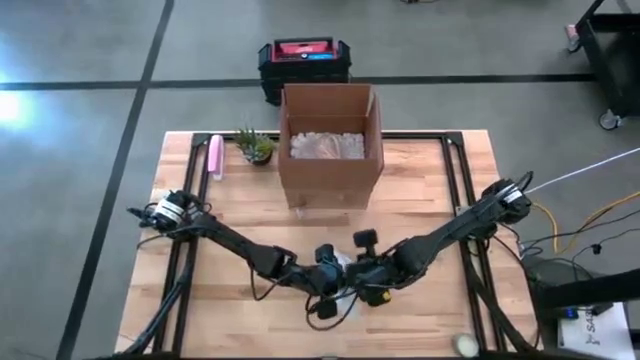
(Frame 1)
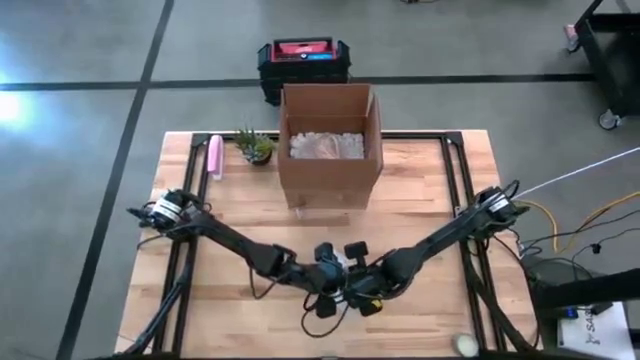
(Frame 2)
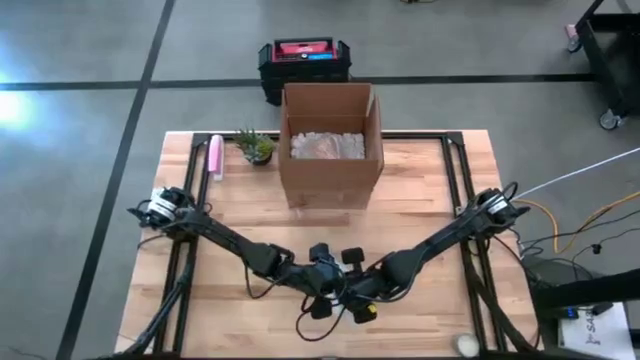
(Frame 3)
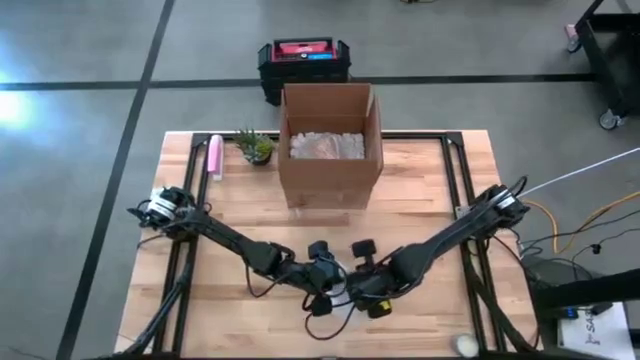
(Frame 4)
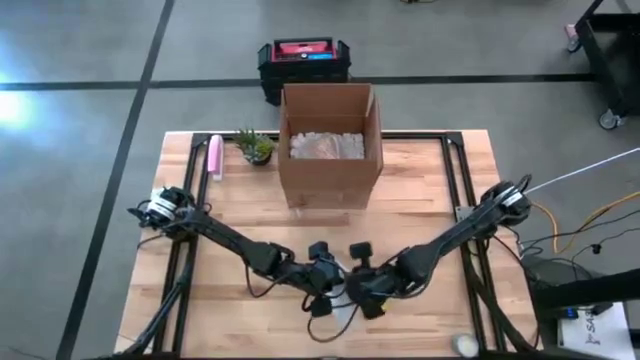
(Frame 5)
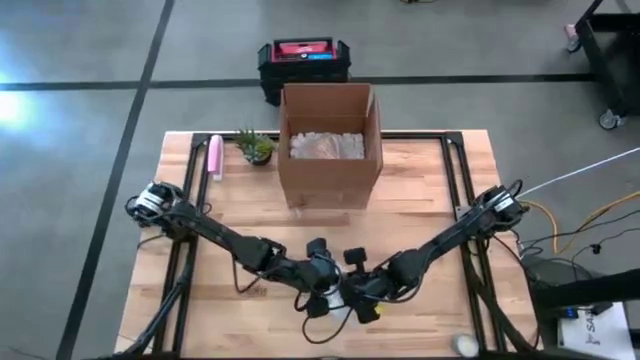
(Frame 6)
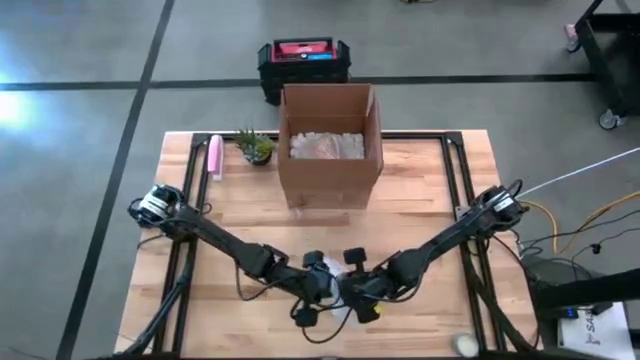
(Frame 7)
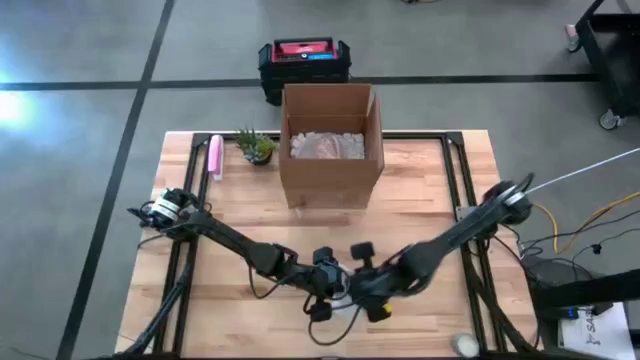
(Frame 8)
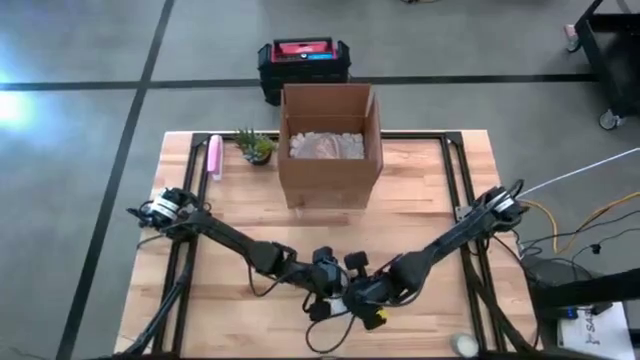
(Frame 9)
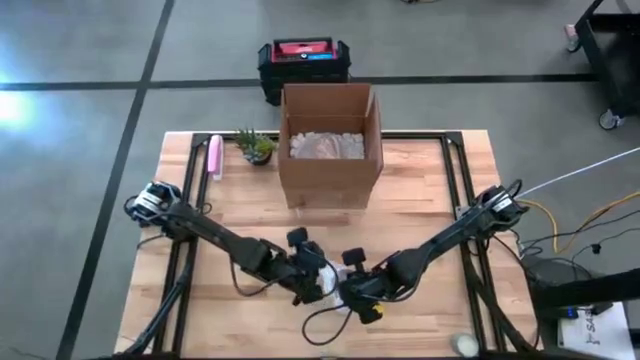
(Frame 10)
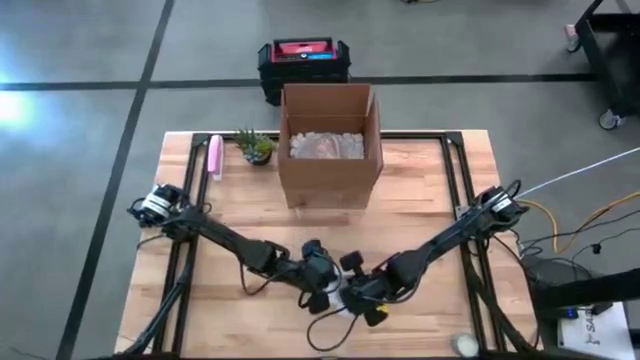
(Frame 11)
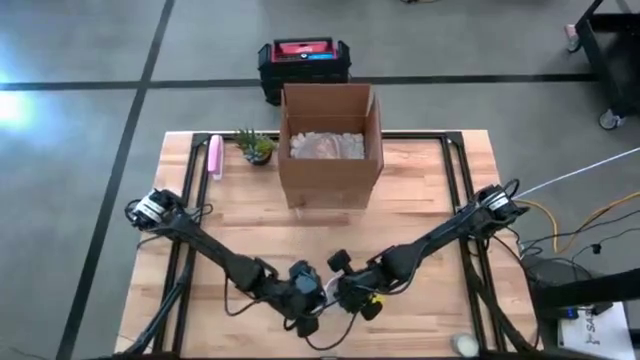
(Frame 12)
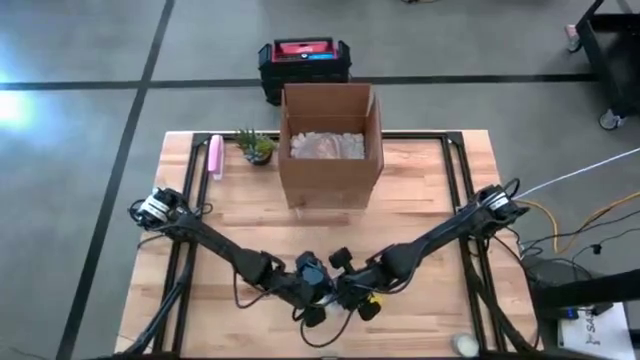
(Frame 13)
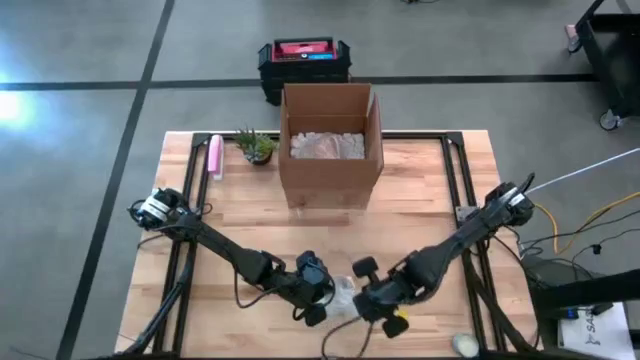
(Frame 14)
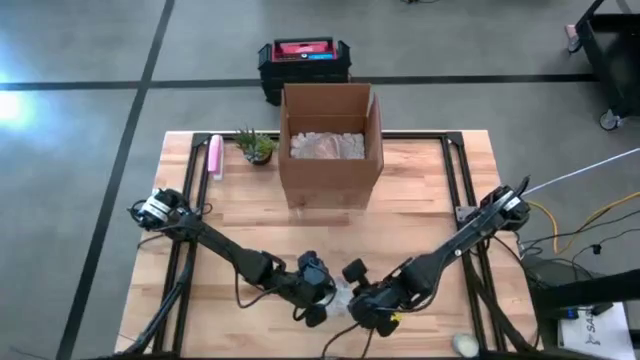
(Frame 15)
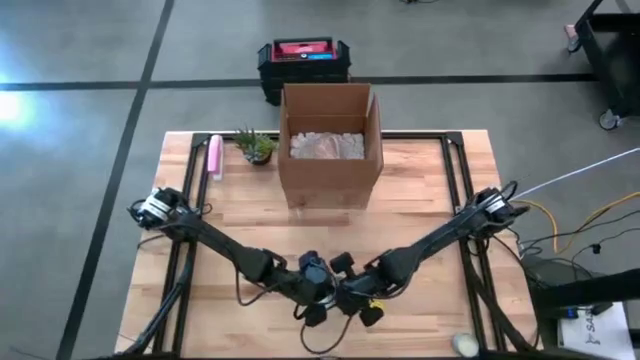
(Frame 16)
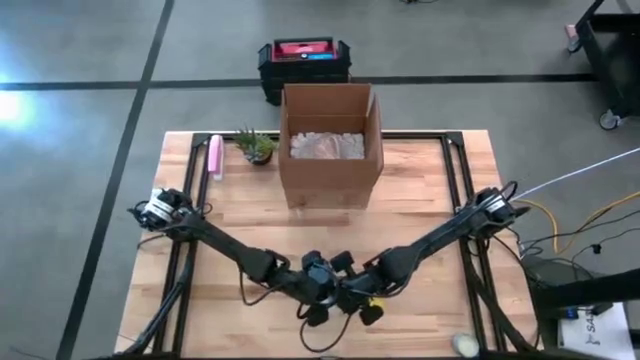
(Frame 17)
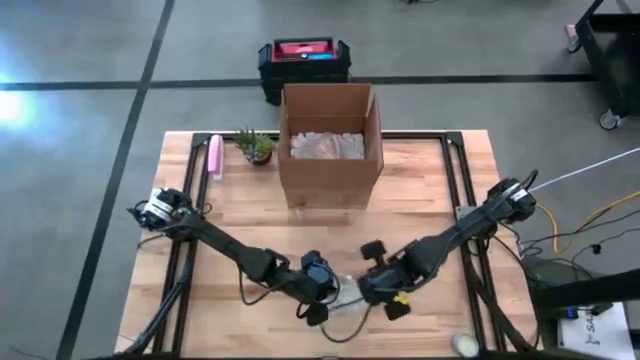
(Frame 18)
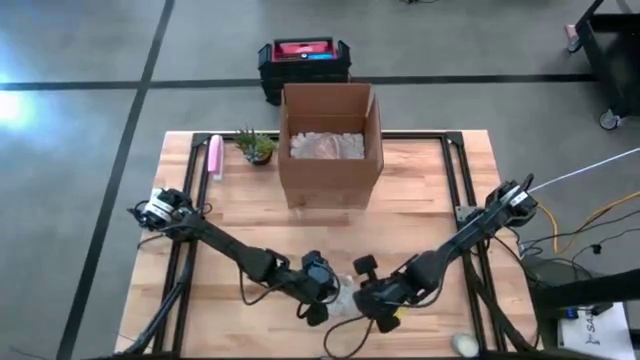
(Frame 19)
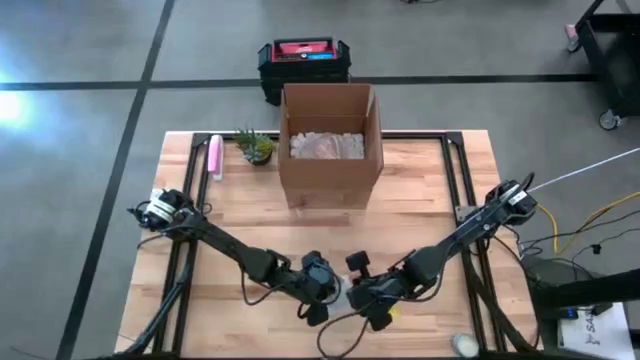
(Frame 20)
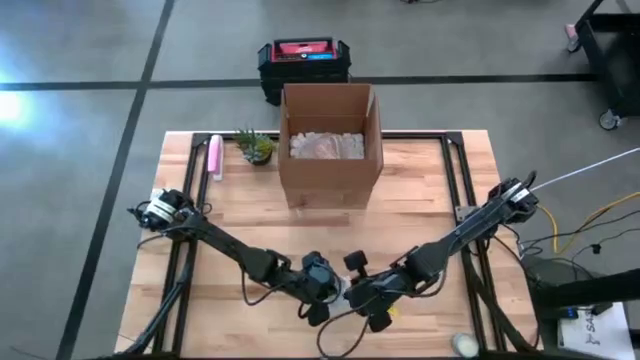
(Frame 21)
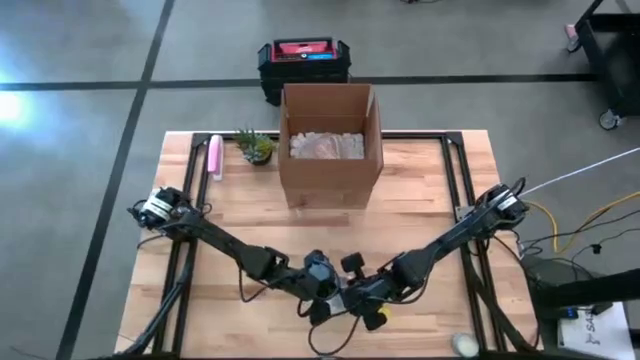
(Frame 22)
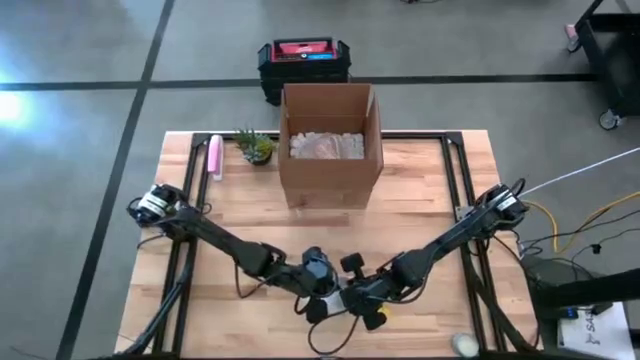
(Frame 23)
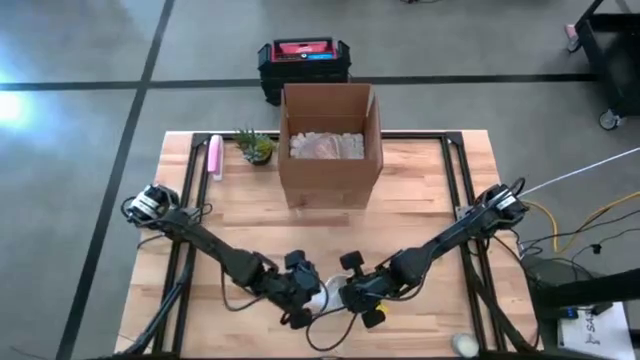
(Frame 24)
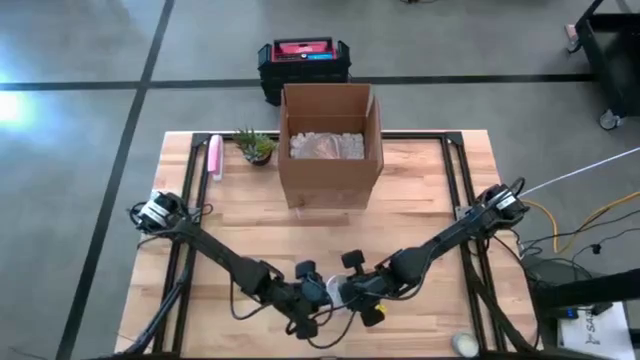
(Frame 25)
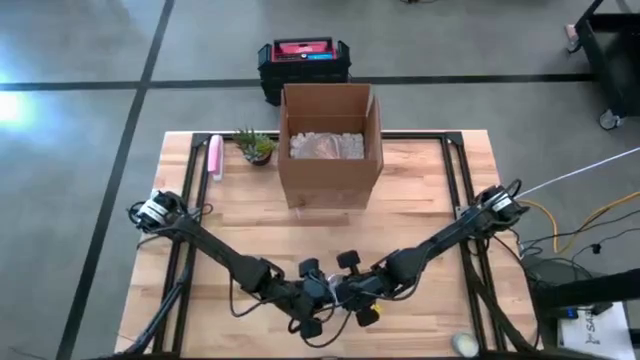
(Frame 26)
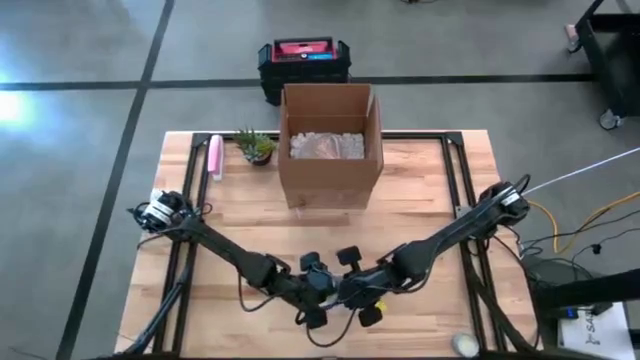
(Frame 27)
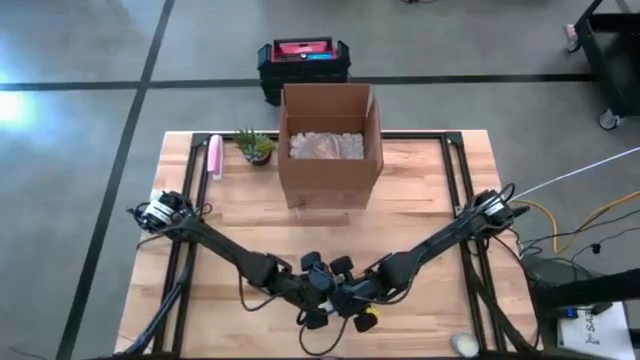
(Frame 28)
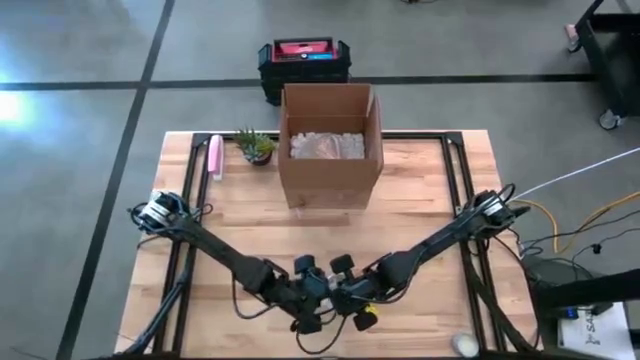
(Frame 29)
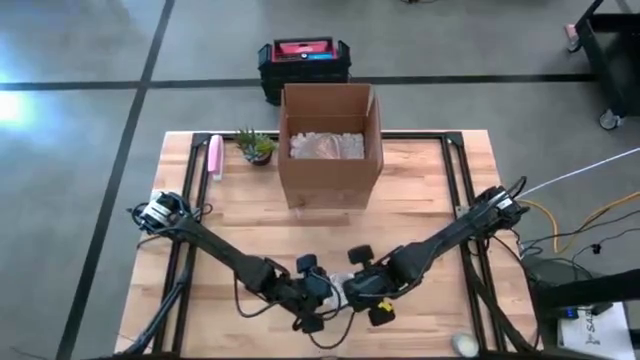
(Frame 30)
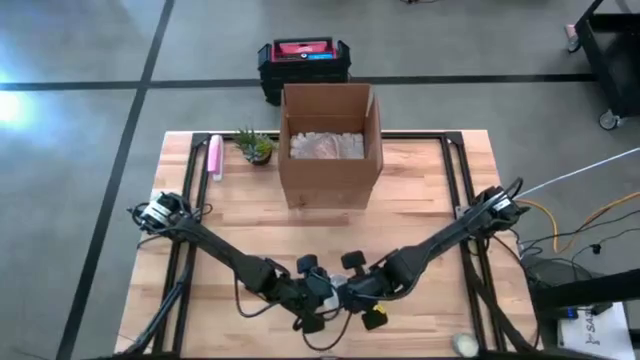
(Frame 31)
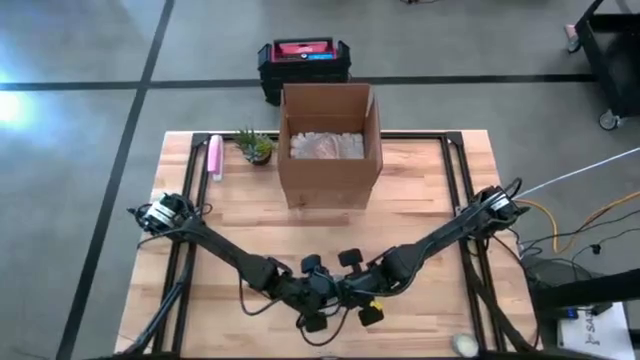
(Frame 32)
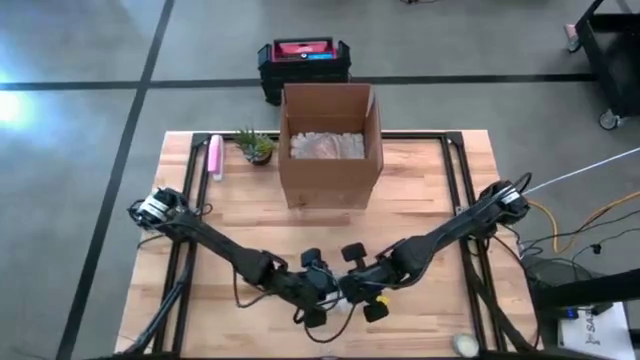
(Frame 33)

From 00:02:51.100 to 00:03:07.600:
Task: wrap mug
Wrap the gray mug with the bubble wrap

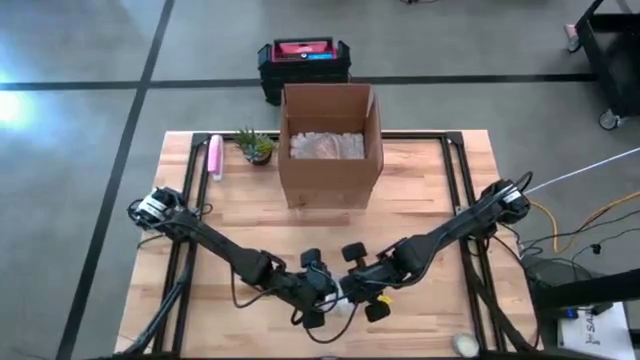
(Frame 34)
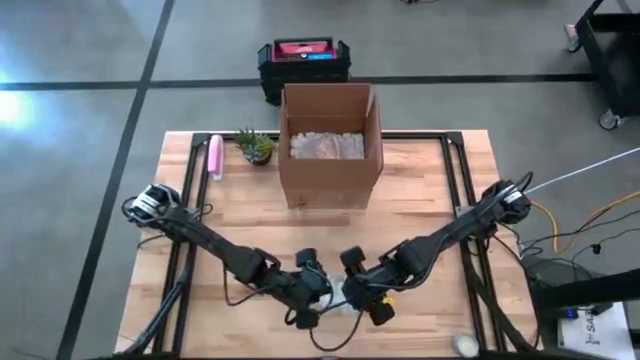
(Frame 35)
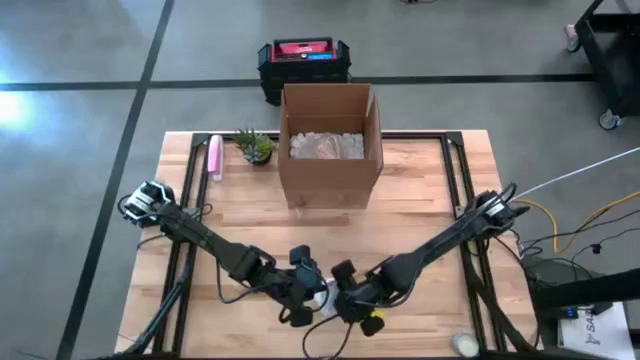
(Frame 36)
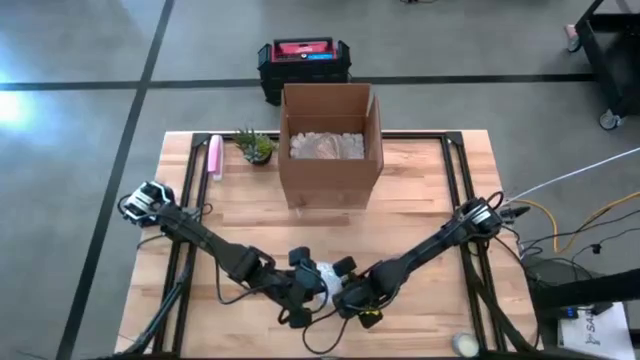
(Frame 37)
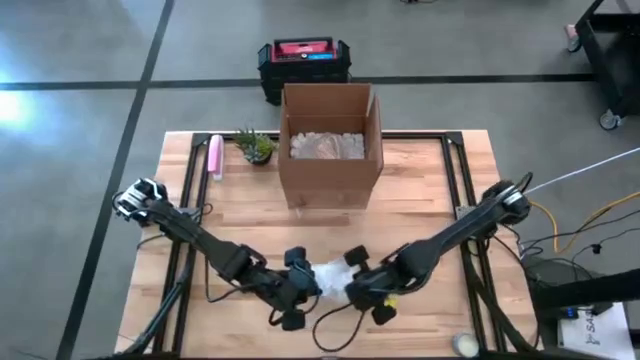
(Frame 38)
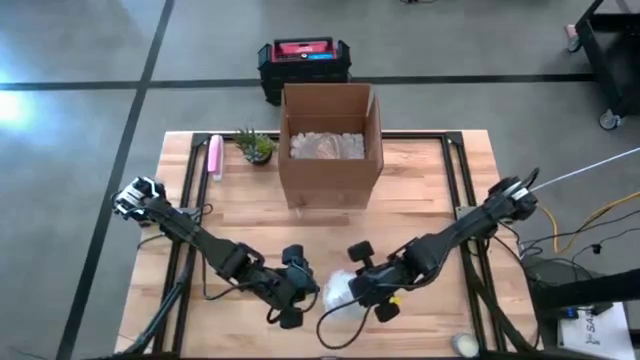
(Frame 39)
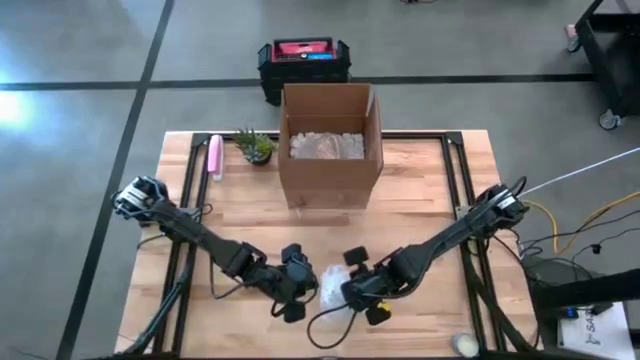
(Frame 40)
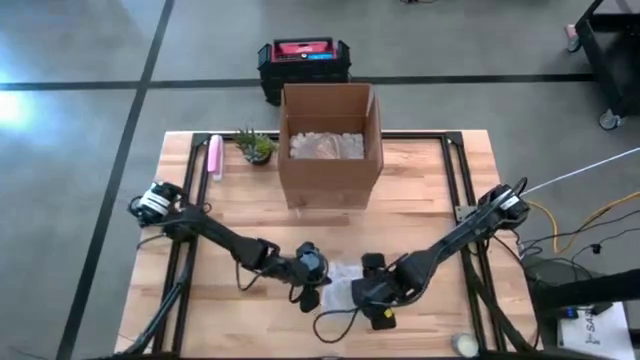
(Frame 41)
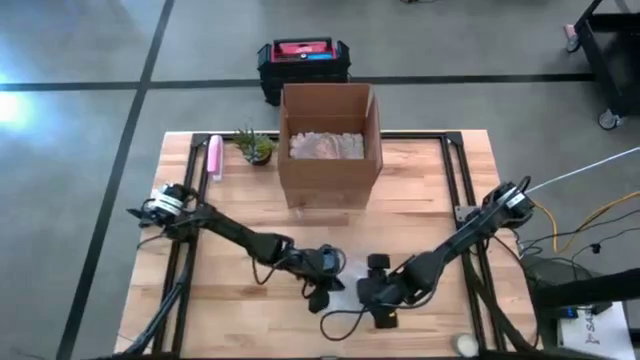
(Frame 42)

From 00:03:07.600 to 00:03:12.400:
Wrap the gray mug with the bubble wrap
